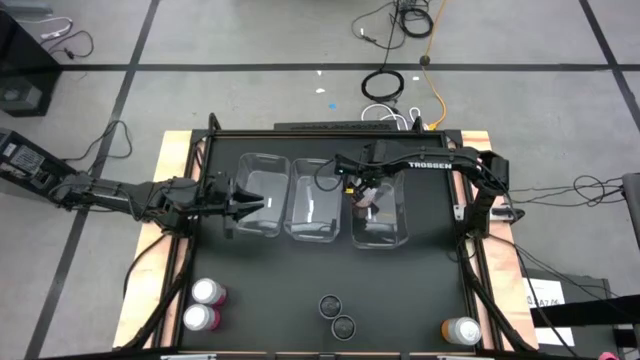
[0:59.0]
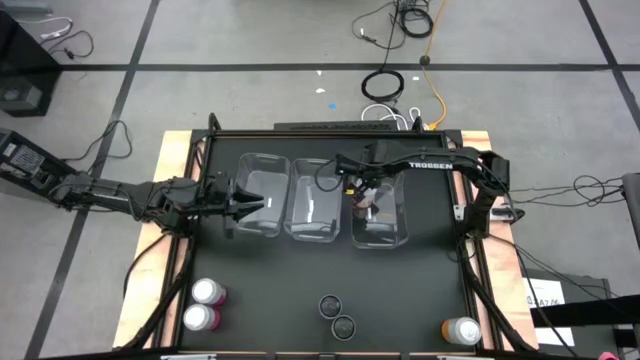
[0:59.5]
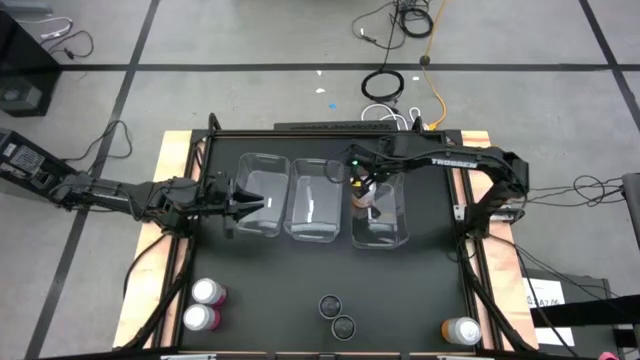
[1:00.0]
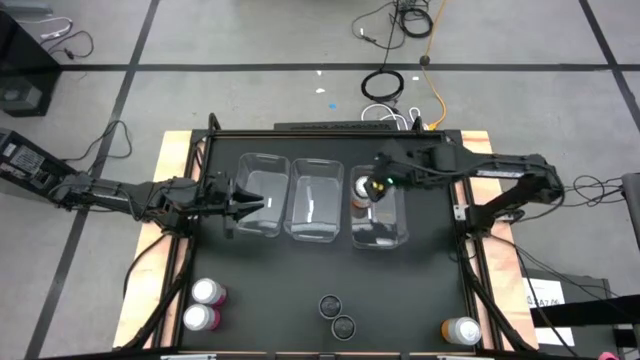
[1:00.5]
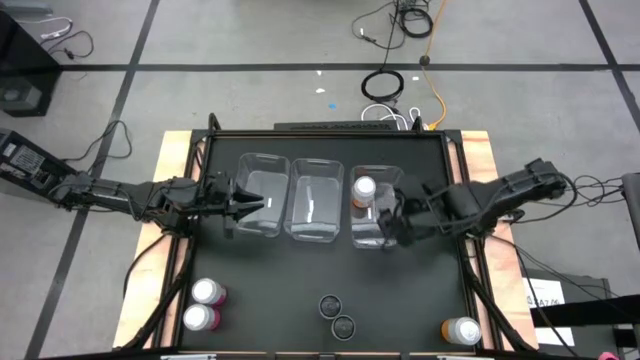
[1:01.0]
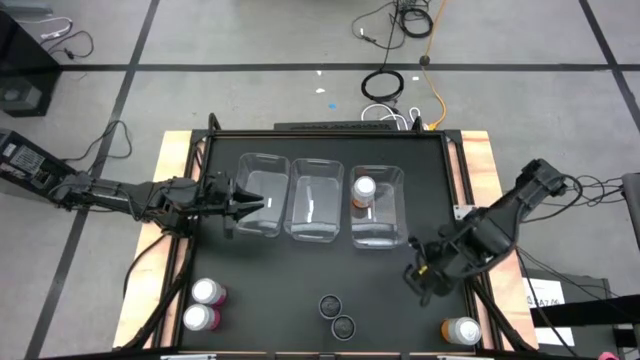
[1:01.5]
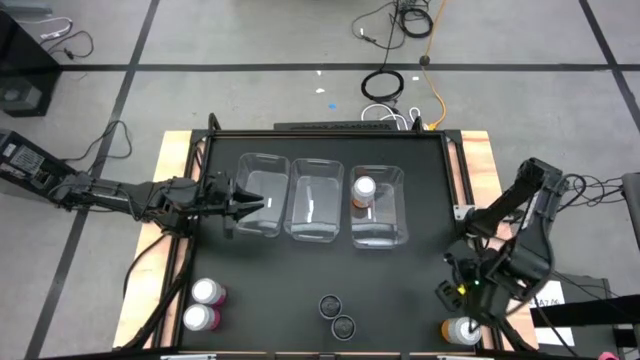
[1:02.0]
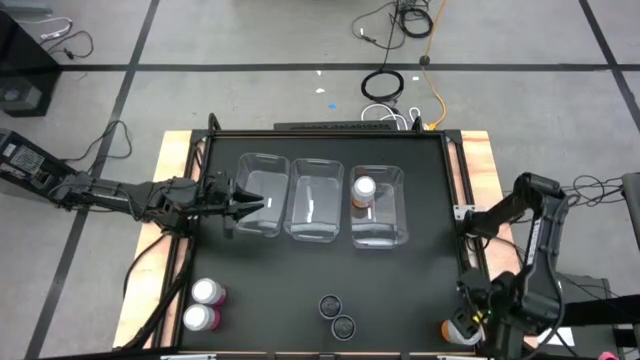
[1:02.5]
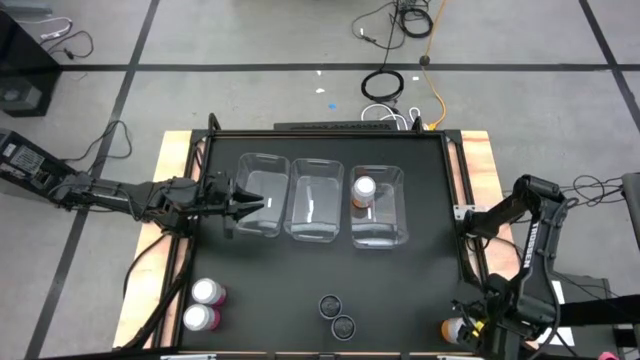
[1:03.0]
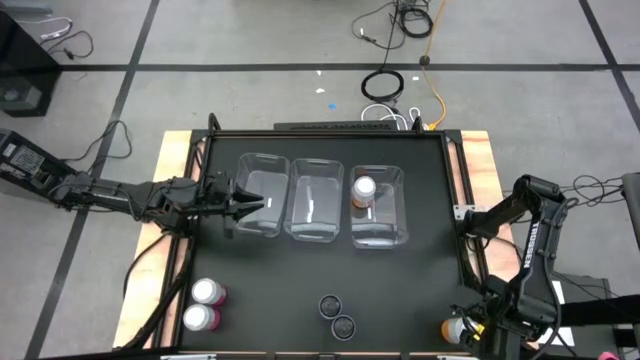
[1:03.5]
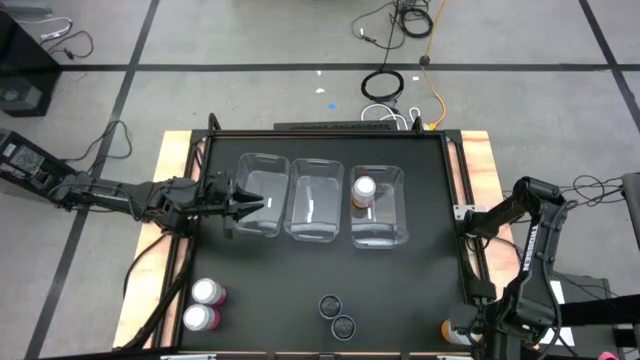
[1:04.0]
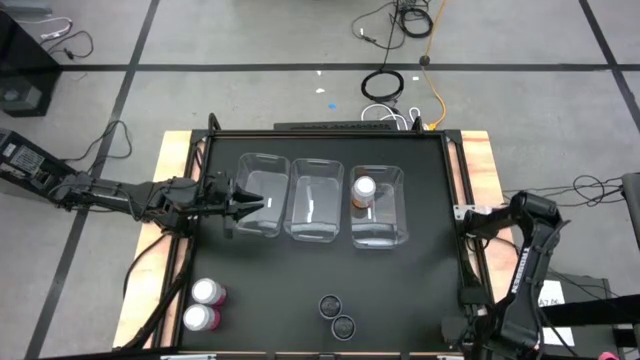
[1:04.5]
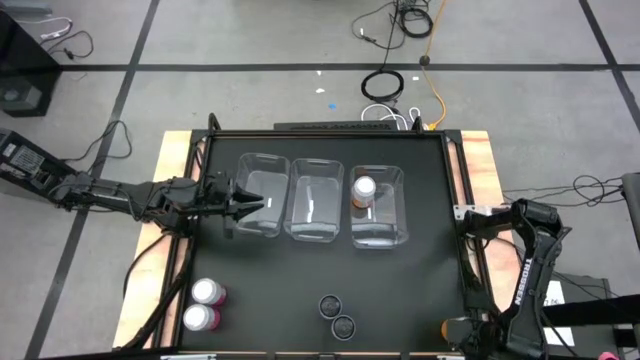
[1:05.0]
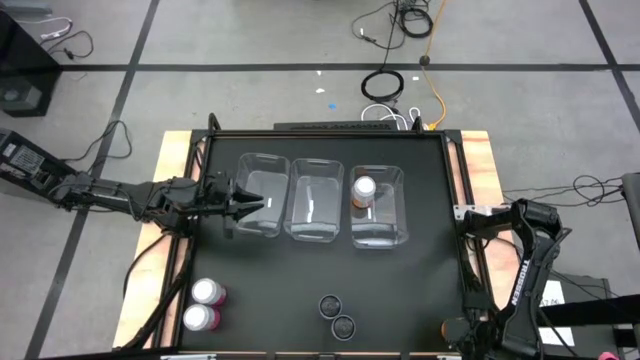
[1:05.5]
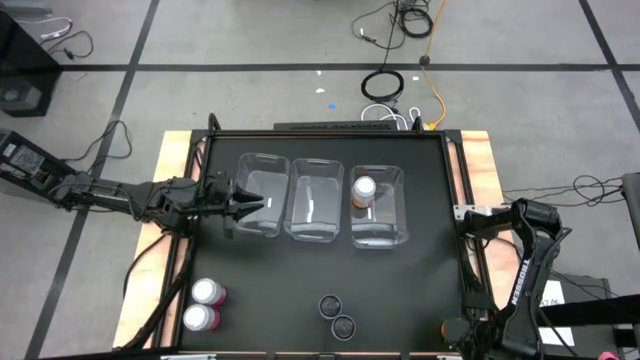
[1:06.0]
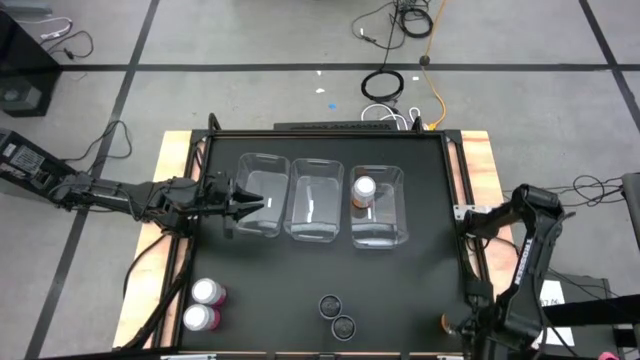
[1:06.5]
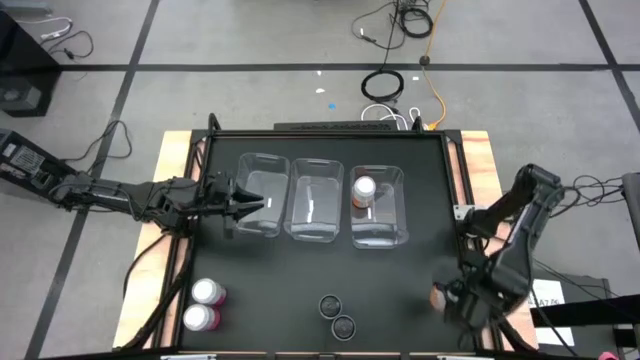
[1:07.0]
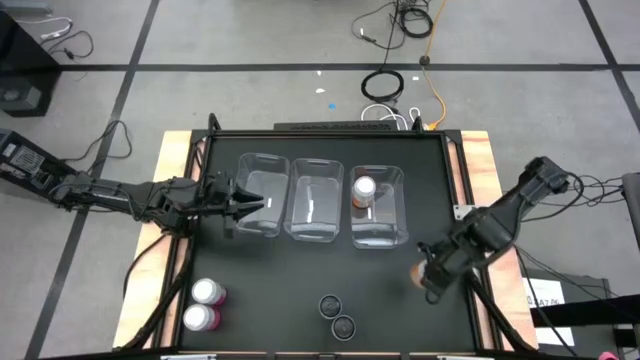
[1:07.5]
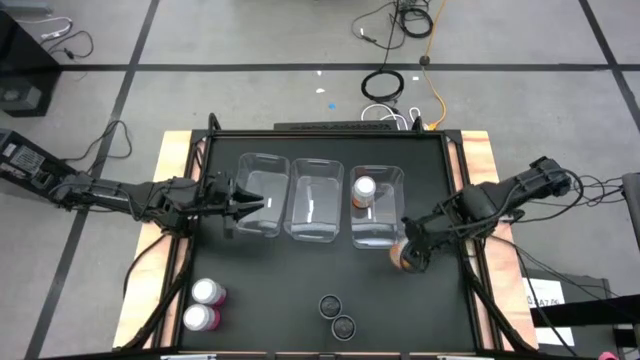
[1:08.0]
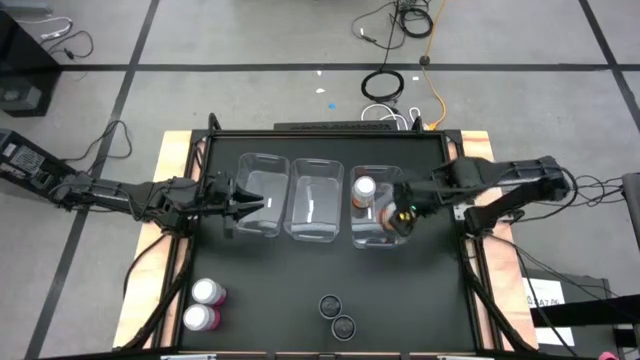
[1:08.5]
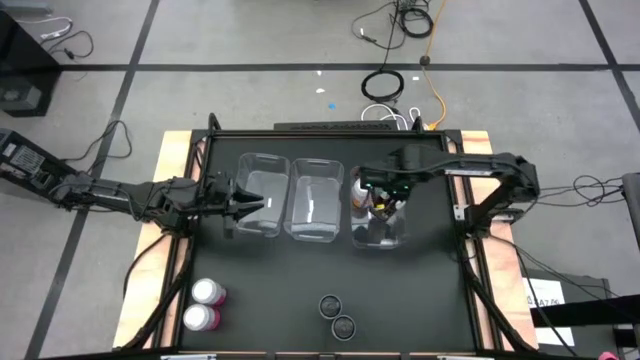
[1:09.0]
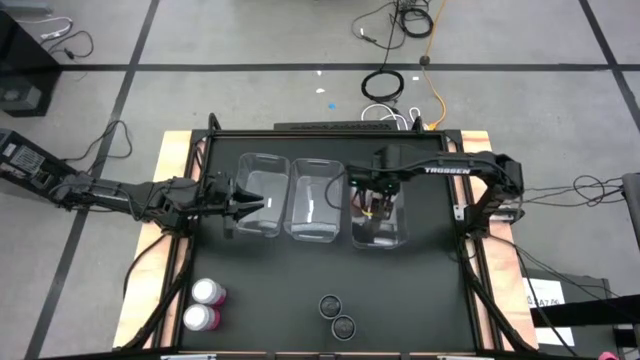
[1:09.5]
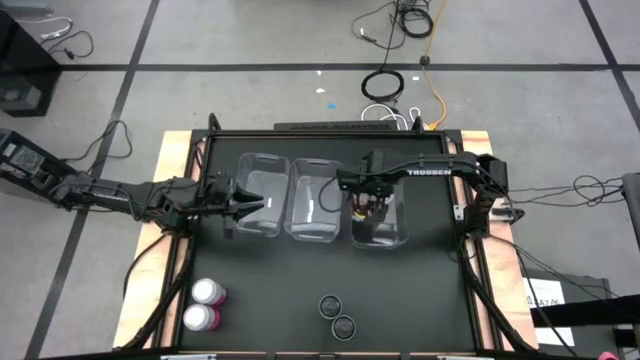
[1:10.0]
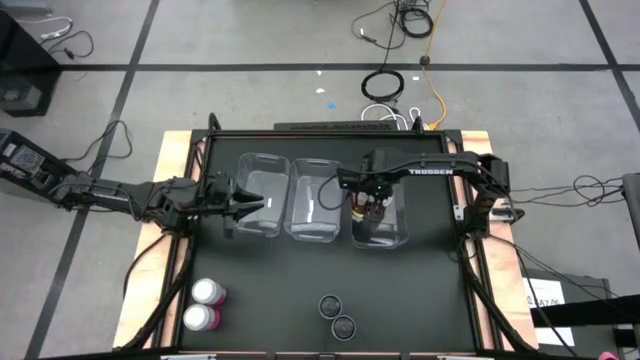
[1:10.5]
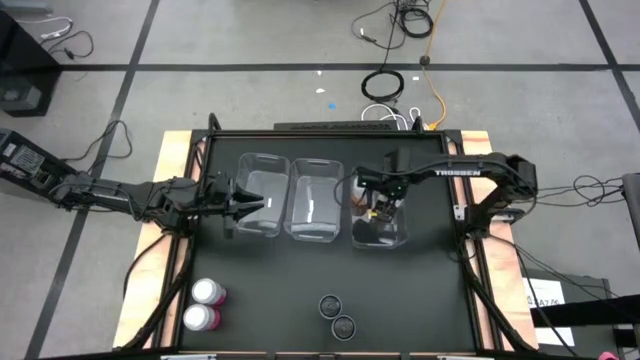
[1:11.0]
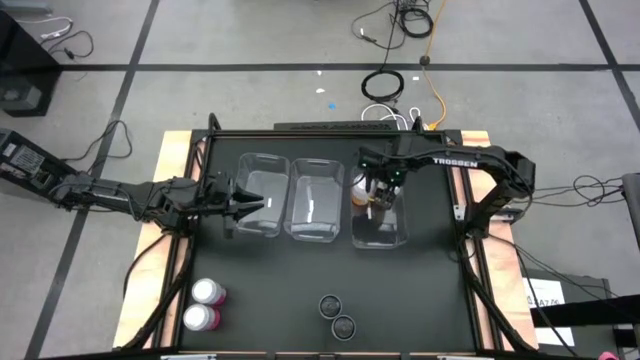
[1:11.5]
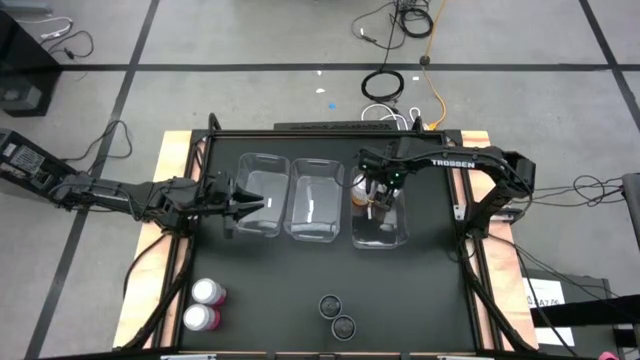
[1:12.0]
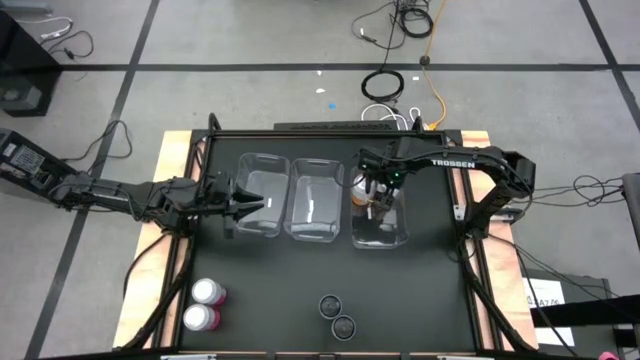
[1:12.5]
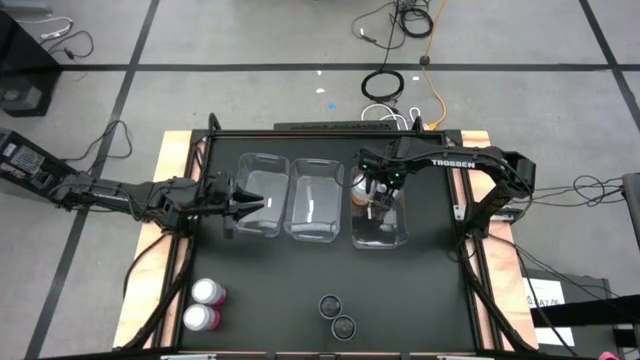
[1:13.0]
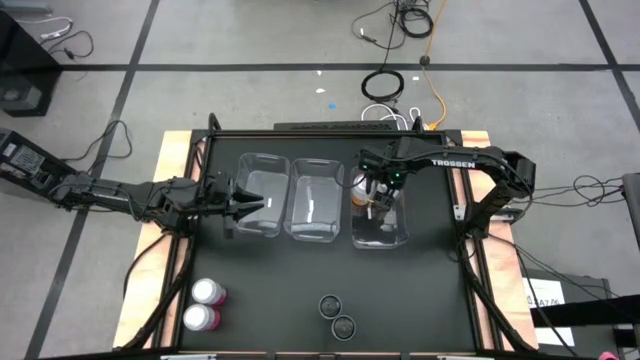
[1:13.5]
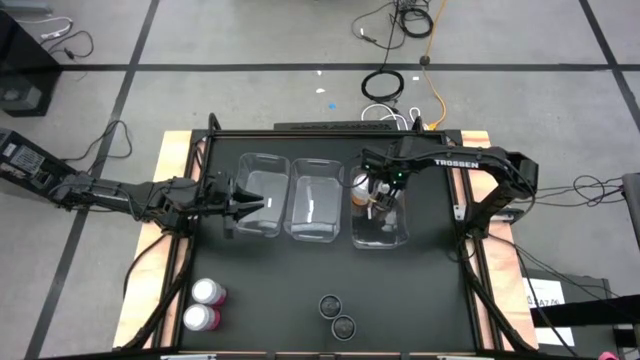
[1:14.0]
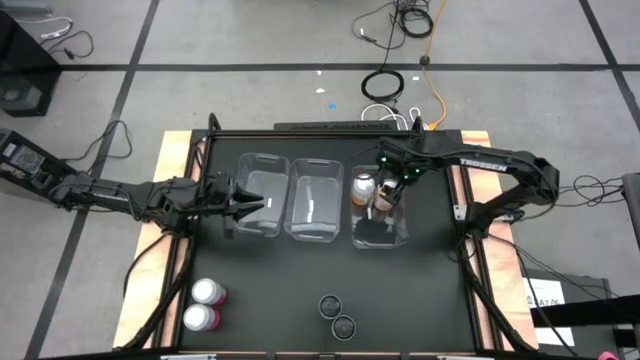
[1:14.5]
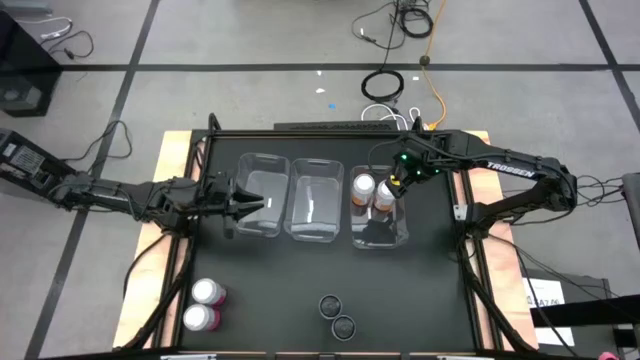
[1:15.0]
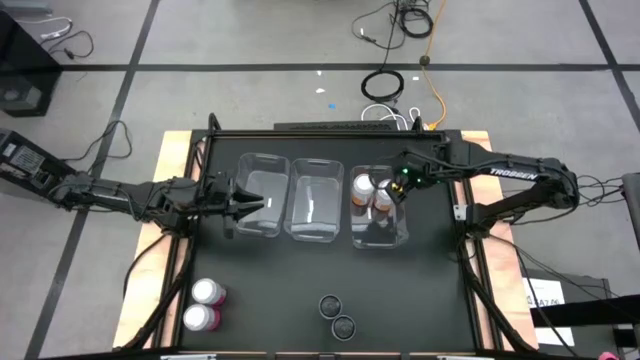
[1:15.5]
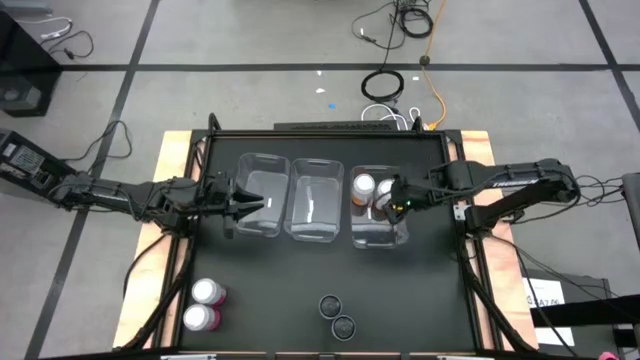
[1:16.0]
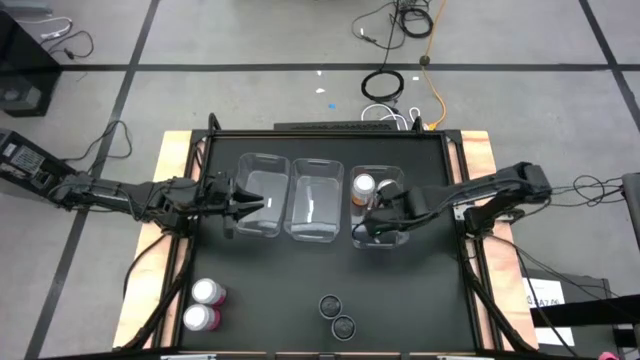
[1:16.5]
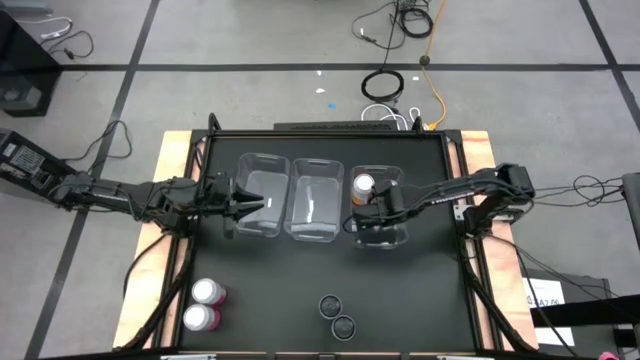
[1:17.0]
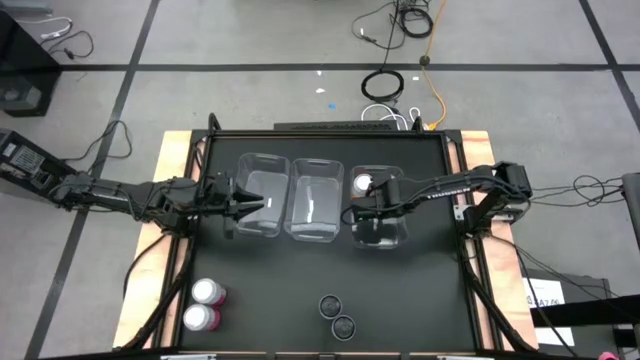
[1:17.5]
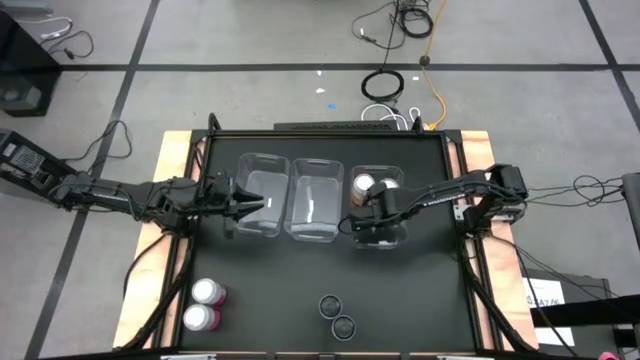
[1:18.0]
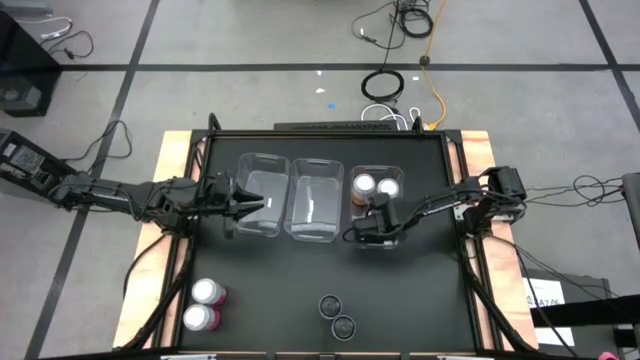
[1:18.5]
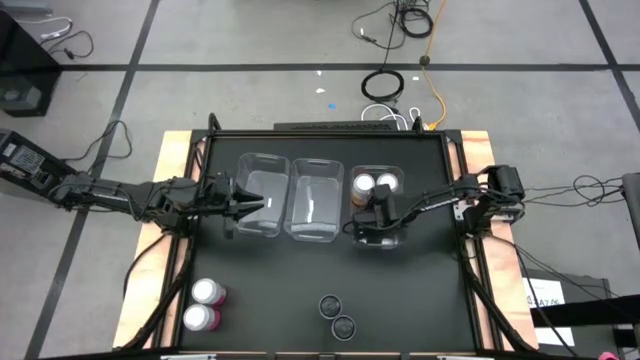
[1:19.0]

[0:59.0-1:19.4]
Task: Sort soda cans
Put the yellow-white soda can into the right transparent bin
